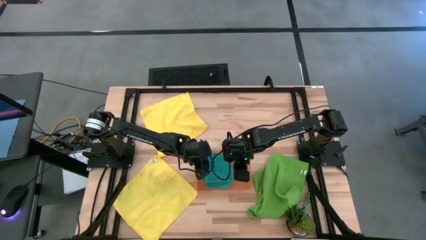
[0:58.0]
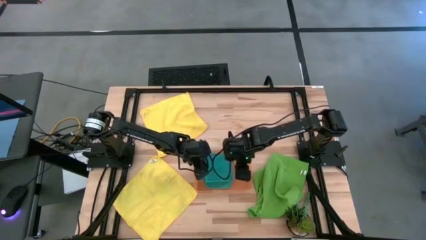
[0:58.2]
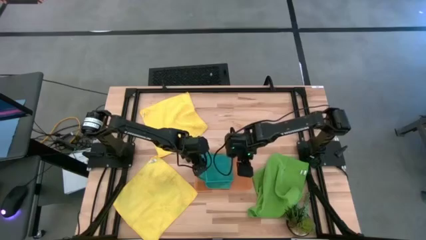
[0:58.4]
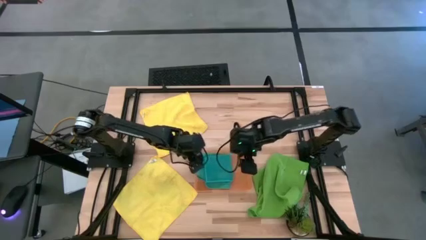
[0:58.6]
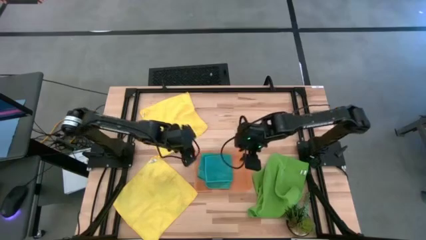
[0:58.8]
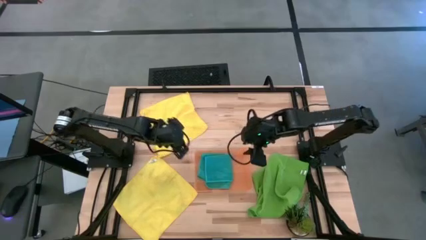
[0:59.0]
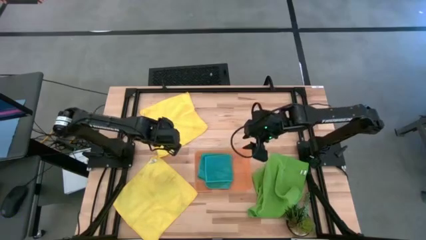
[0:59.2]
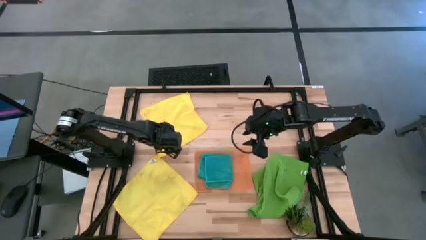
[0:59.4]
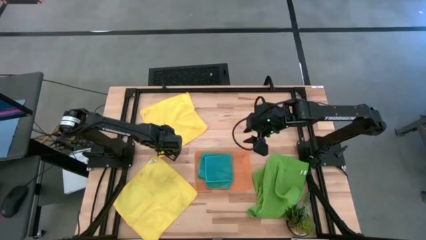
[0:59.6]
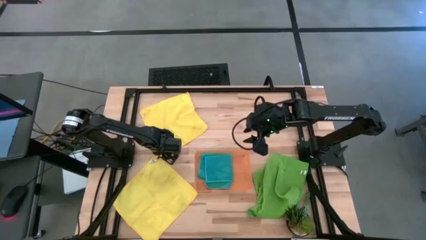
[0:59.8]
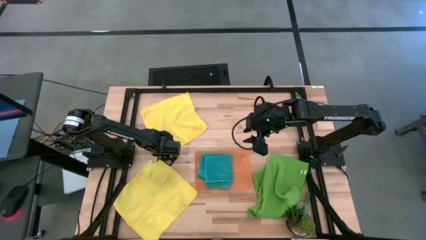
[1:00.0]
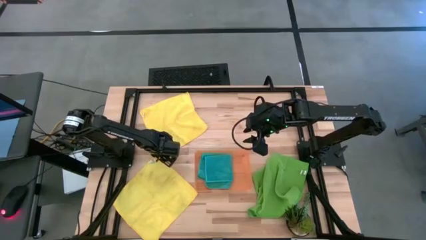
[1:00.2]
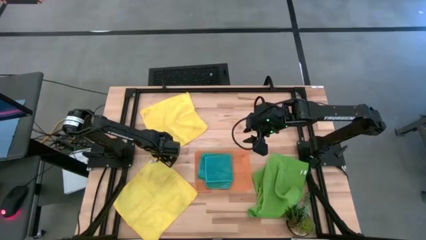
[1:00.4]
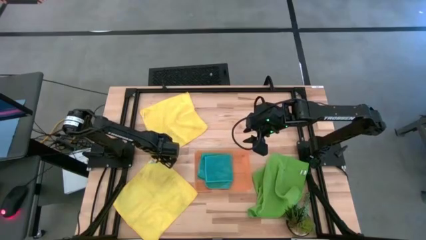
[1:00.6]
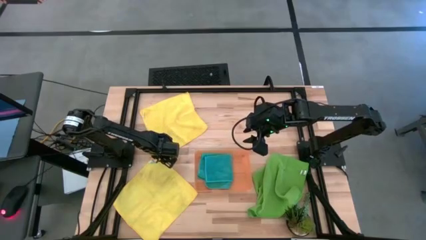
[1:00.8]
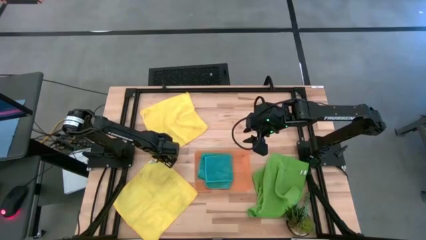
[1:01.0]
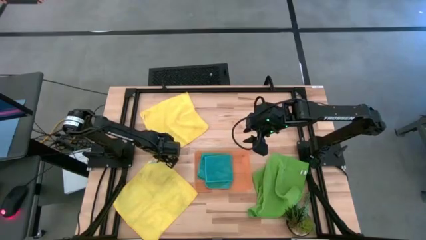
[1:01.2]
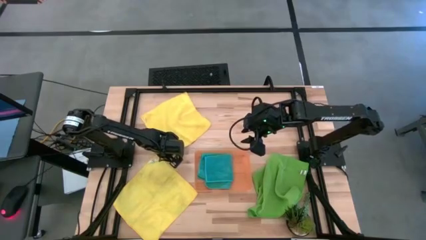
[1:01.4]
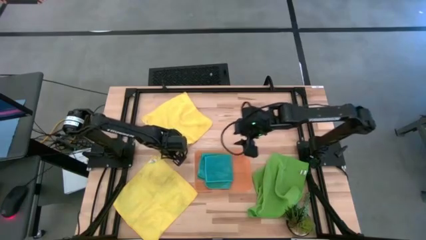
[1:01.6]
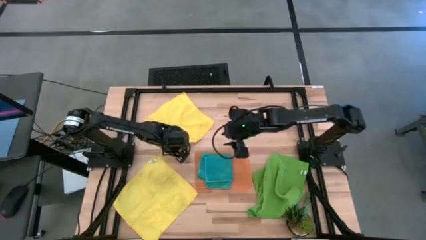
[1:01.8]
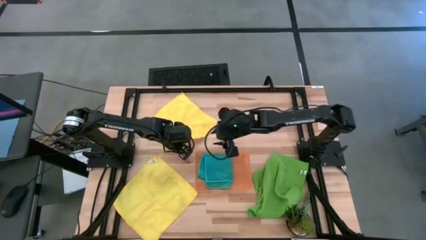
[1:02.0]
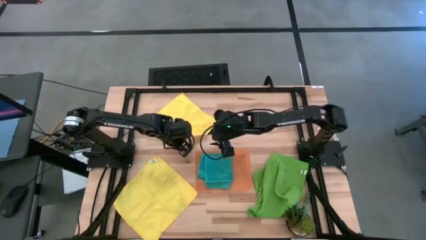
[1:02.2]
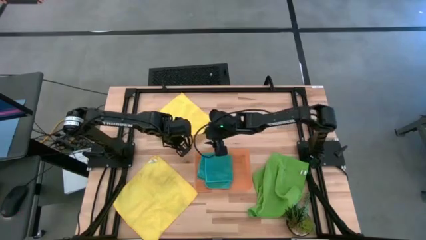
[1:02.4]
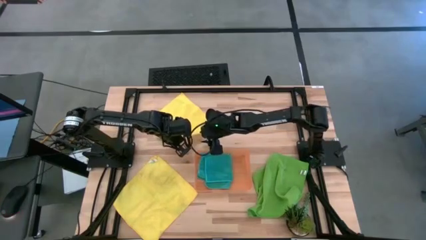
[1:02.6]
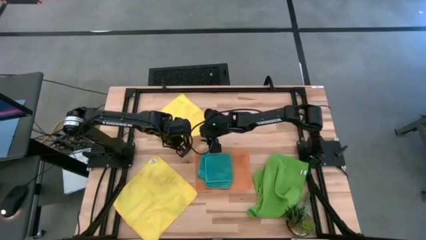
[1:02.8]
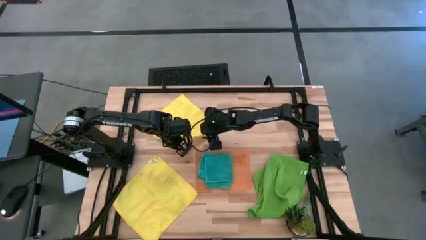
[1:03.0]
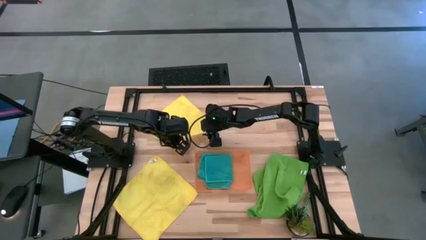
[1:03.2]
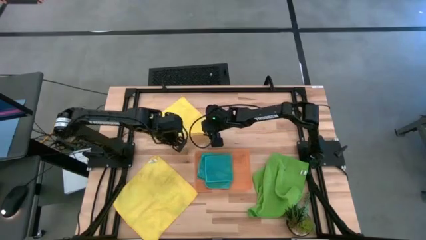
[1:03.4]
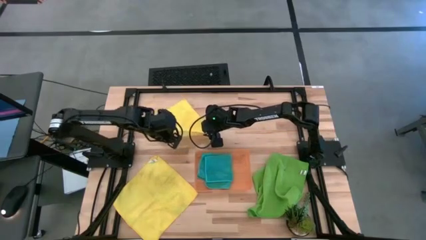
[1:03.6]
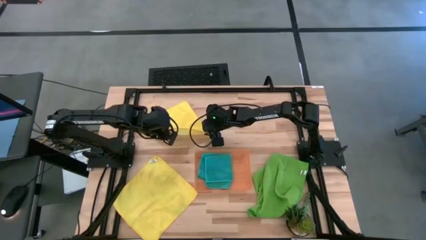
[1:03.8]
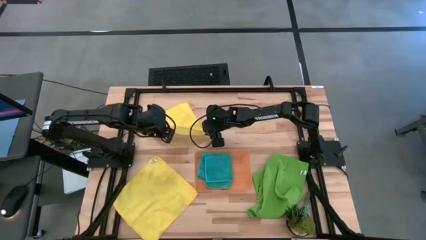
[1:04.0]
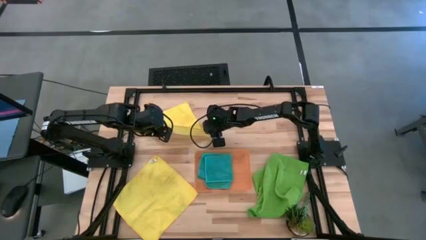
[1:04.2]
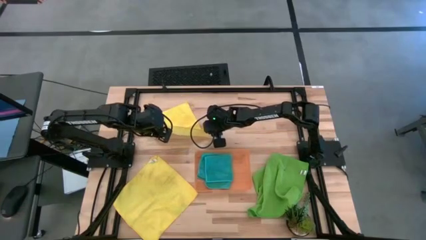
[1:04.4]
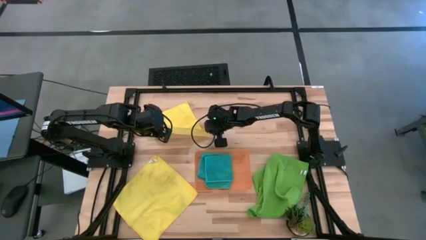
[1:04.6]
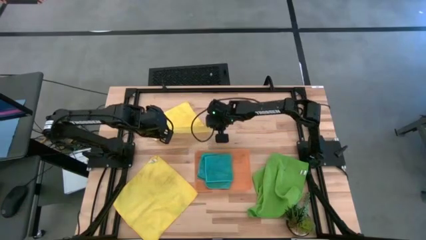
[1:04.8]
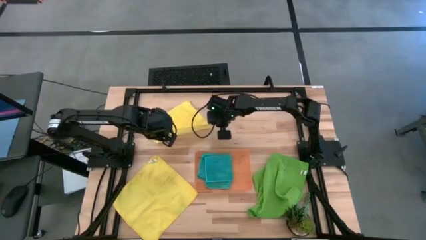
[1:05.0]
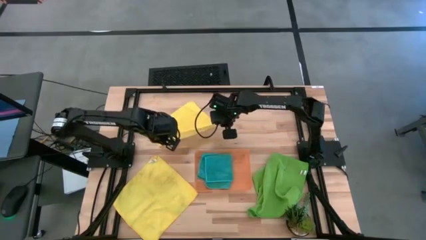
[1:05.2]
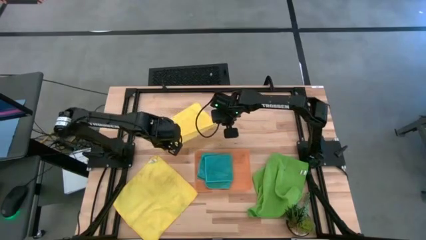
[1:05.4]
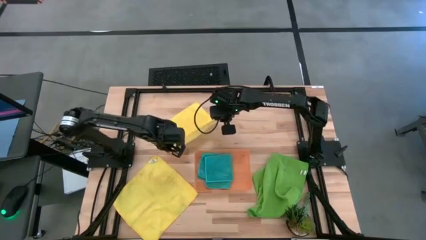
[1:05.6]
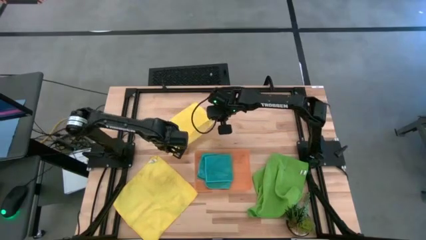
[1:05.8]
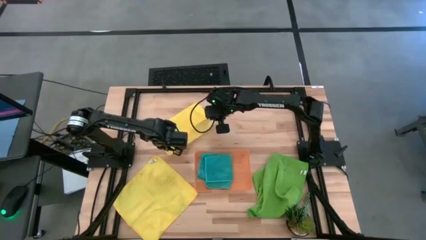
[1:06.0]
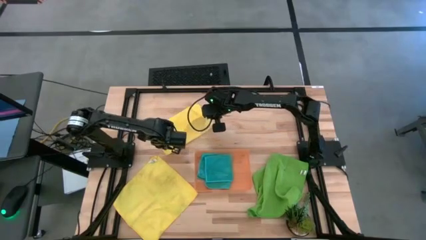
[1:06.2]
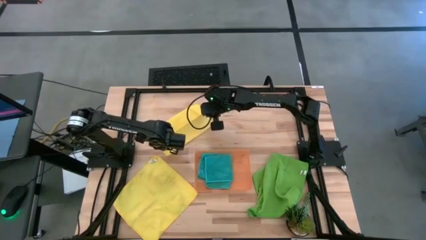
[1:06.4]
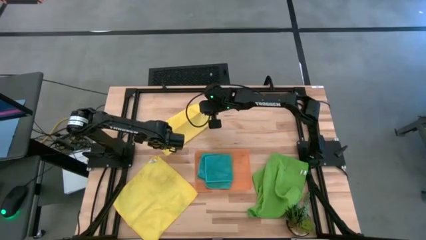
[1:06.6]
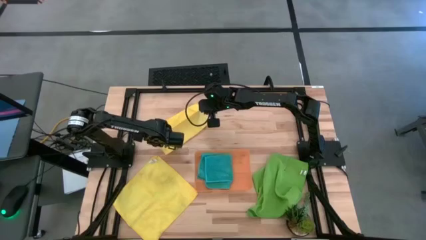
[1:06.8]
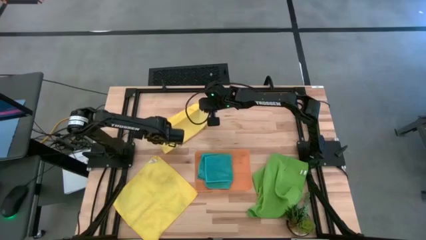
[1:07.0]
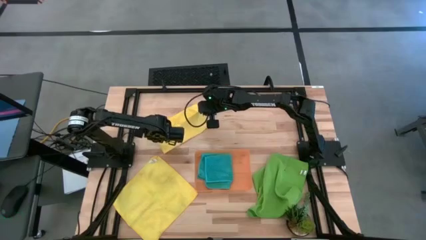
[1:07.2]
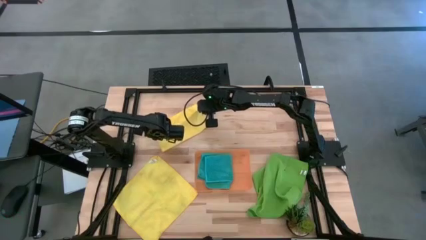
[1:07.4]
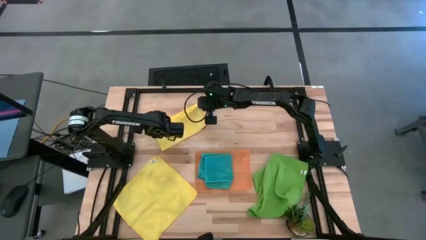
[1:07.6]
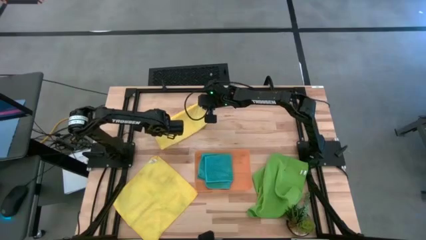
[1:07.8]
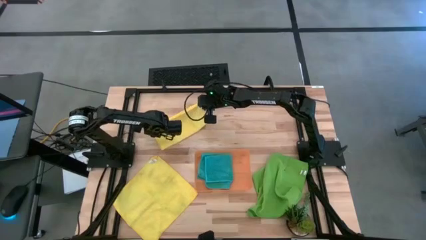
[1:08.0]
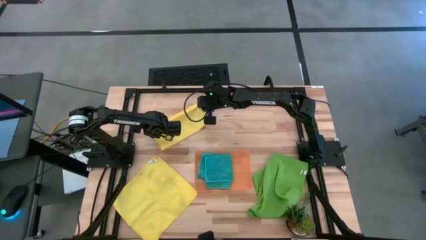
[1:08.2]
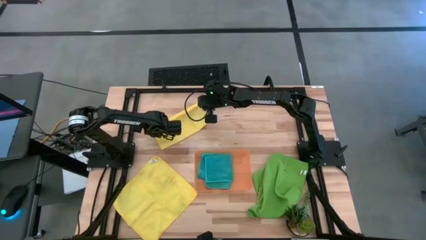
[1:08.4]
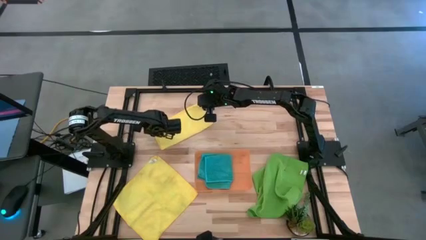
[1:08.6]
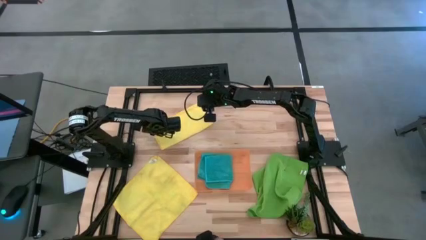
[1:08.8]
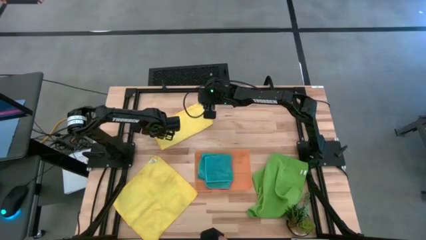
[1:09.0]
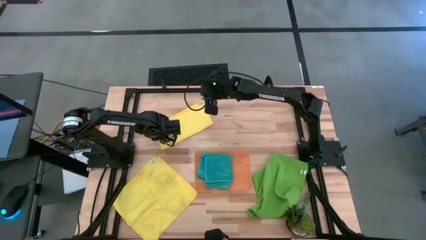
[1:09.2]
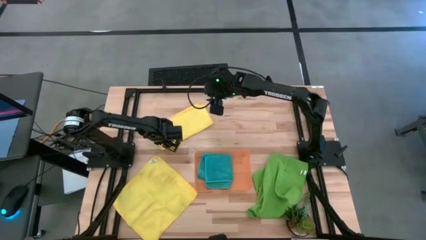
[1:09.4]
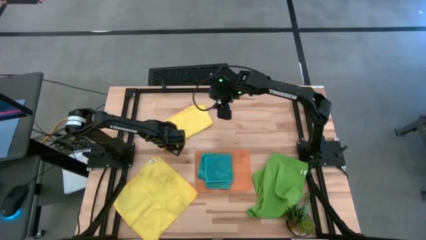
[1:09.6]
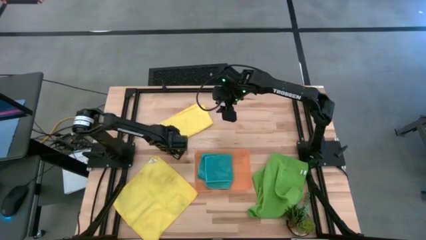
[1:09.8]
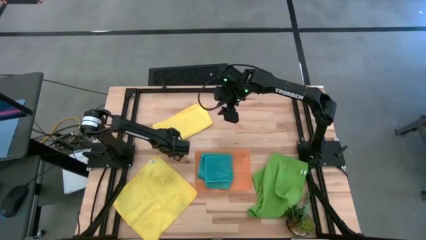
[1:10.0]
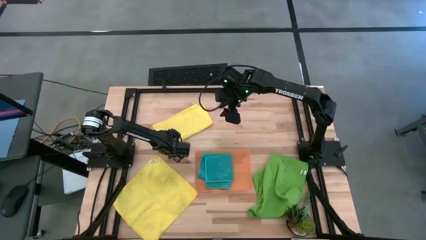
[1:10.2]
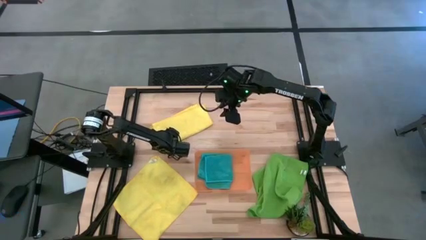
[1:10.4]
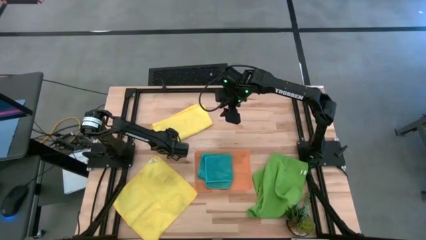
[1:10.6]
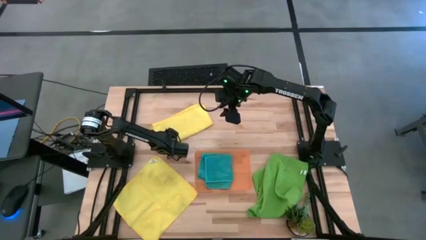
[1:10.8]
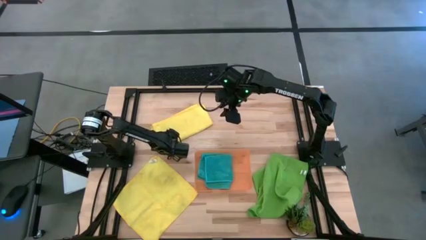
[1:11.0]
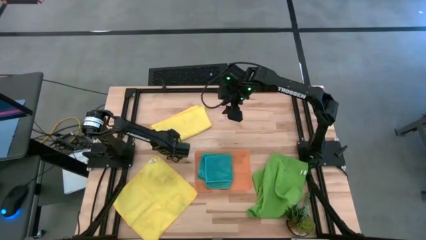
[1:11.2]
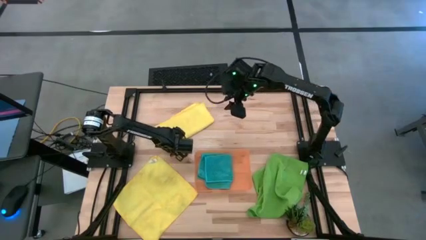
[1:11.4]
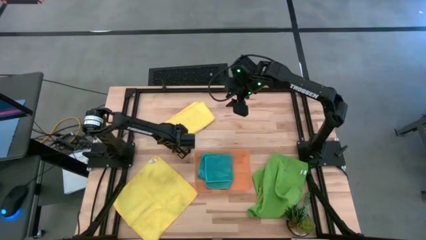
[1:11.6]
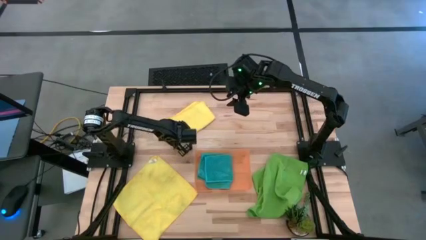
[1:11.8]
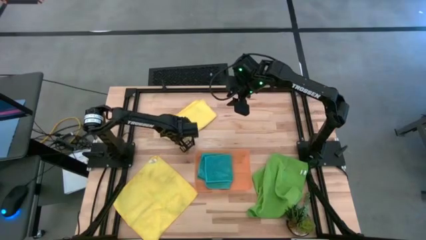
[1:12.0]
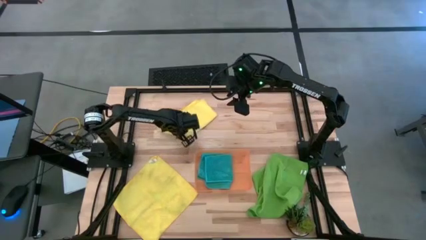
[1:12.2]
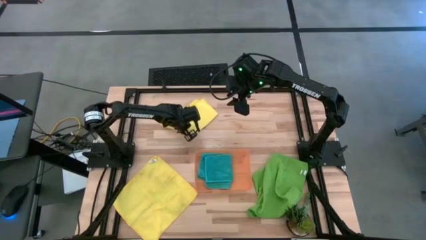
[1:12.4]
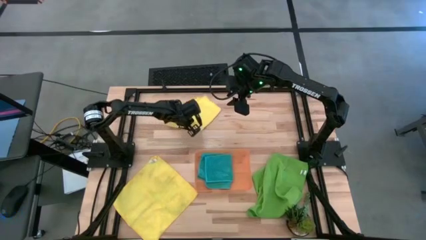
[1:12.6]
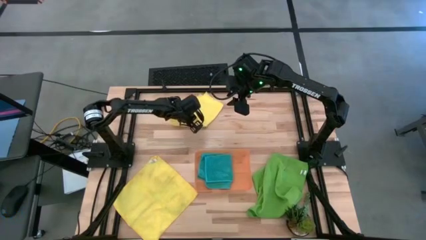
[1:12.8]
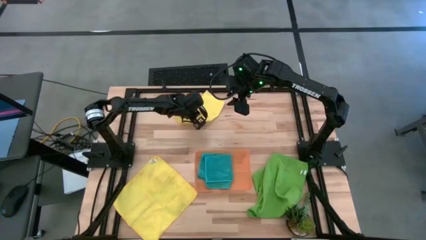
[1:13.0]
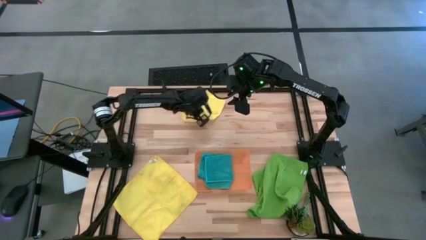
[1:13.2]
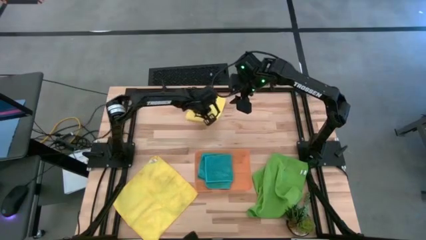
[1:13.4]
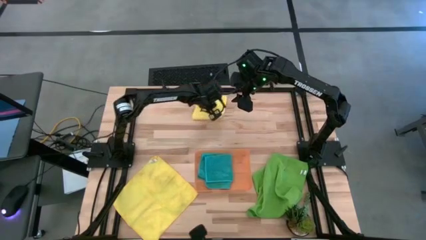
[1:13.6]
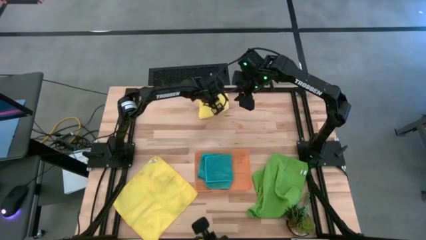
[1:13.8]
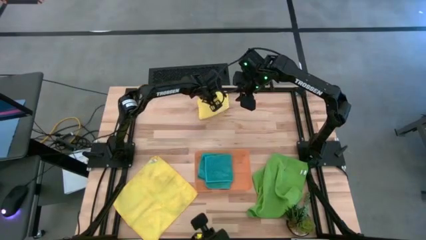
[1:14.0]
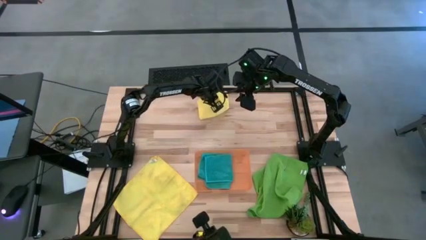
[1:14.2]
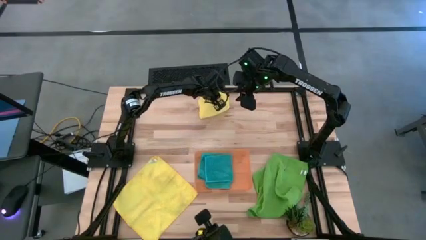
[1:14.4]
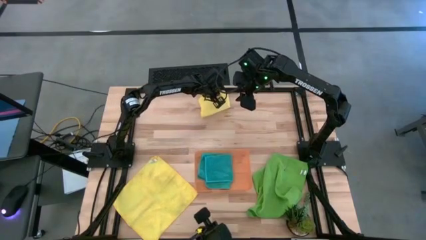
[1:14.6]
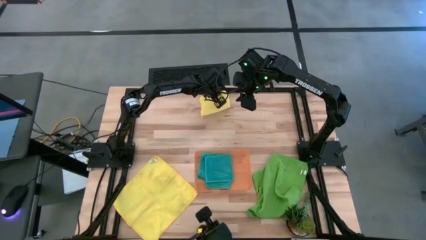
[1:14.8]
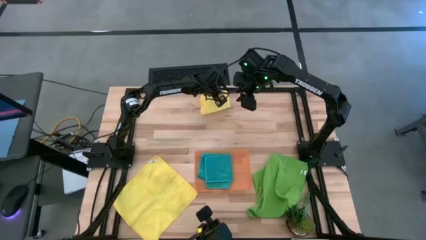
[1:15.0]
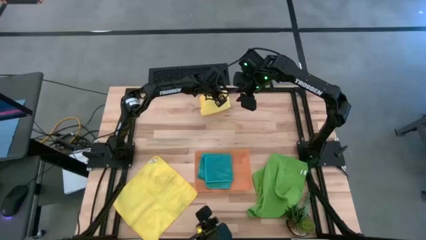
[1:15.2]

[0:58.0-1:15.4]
Task: Fold microfiber towels
Fold the top yellow towel
